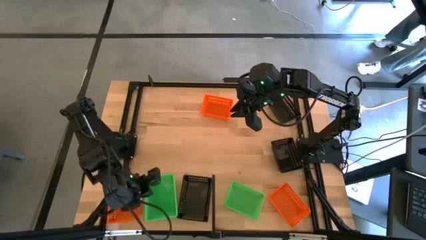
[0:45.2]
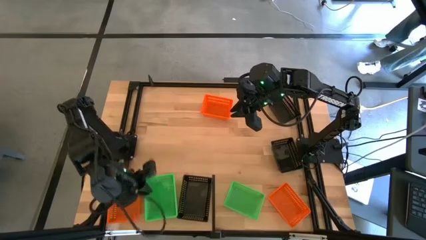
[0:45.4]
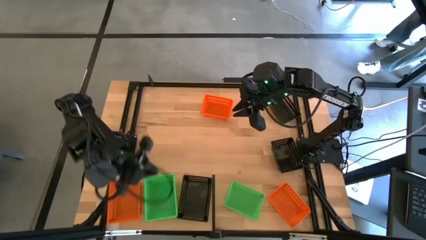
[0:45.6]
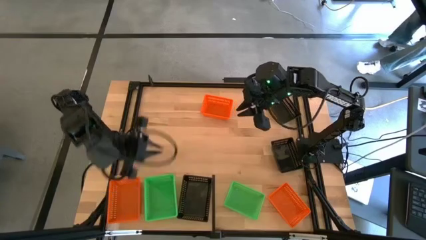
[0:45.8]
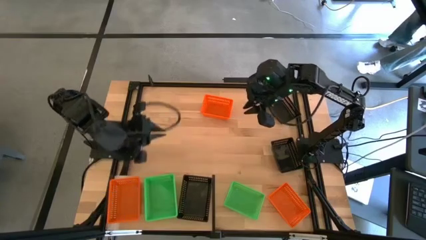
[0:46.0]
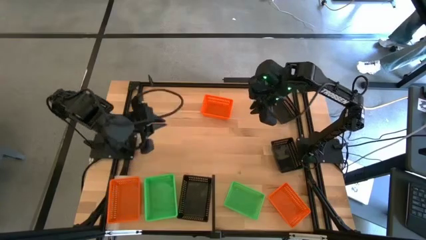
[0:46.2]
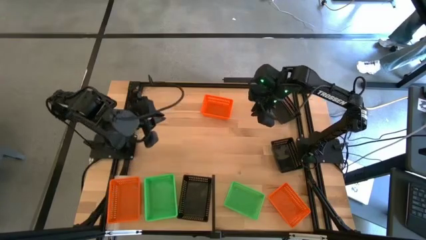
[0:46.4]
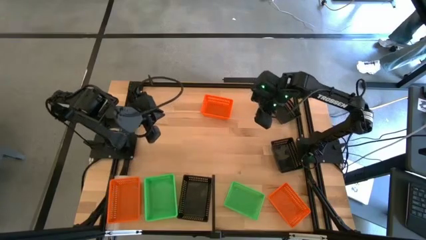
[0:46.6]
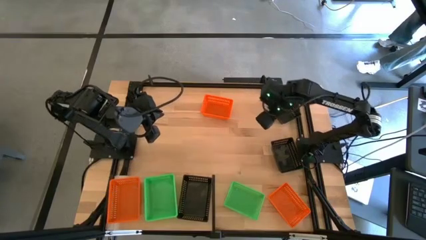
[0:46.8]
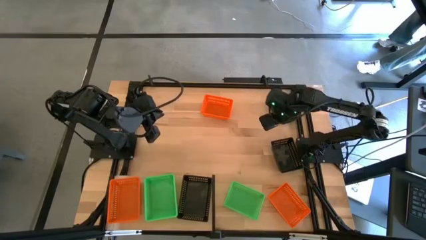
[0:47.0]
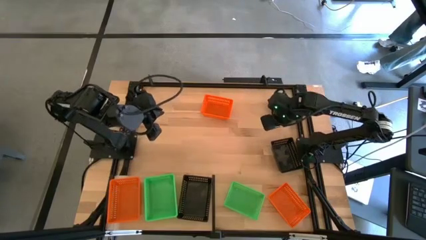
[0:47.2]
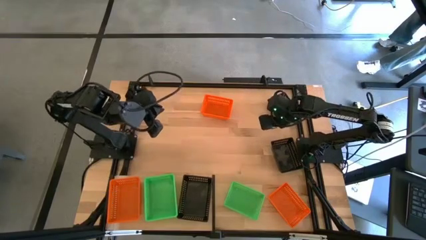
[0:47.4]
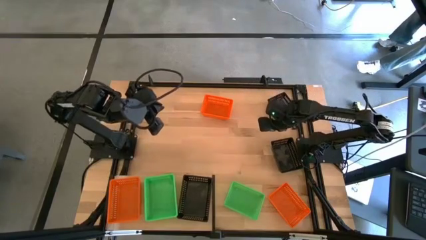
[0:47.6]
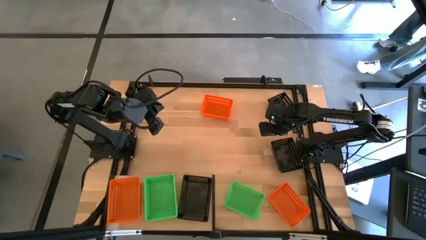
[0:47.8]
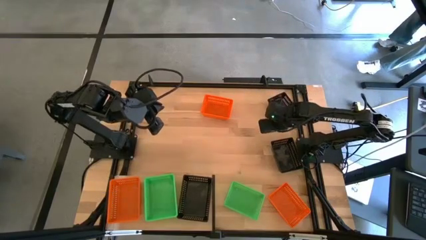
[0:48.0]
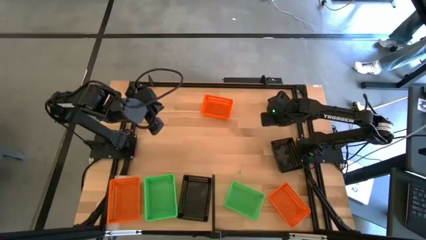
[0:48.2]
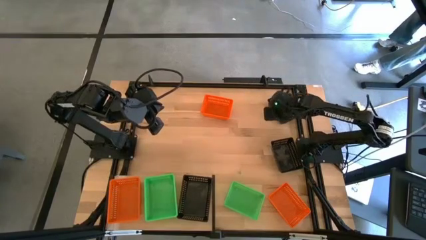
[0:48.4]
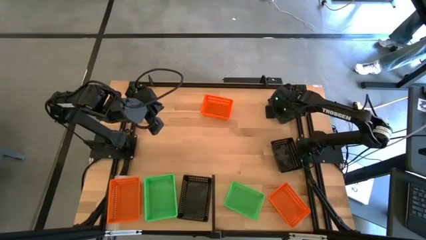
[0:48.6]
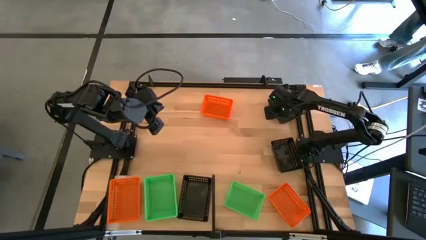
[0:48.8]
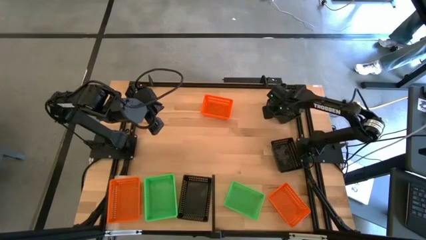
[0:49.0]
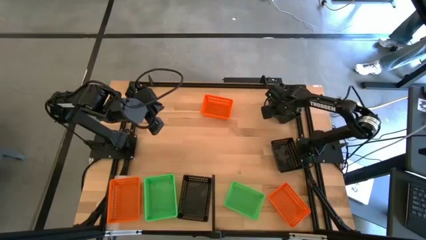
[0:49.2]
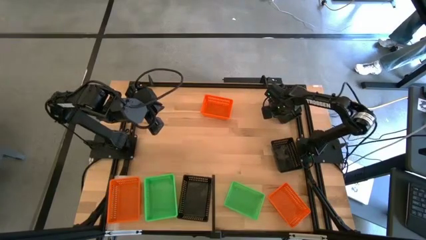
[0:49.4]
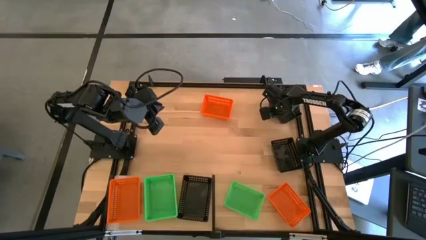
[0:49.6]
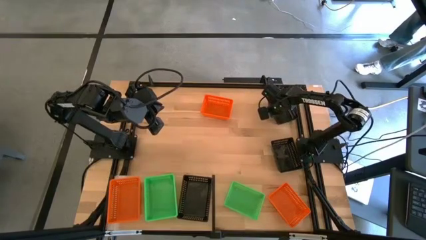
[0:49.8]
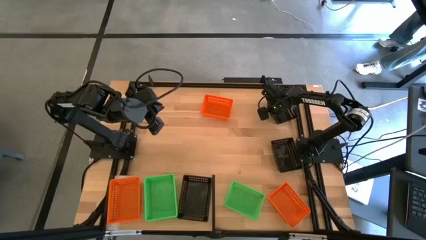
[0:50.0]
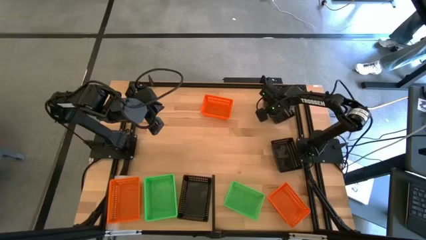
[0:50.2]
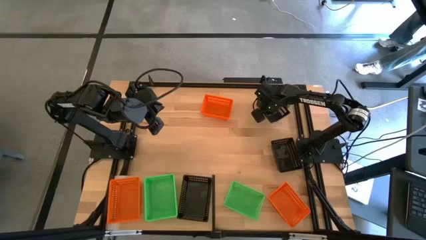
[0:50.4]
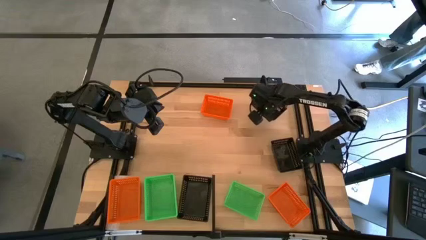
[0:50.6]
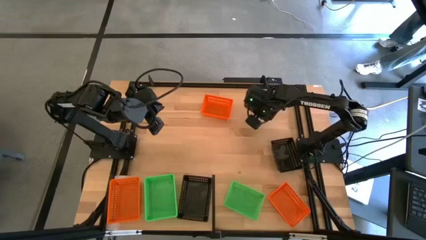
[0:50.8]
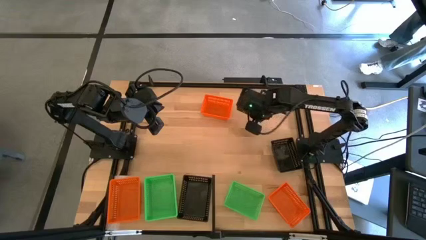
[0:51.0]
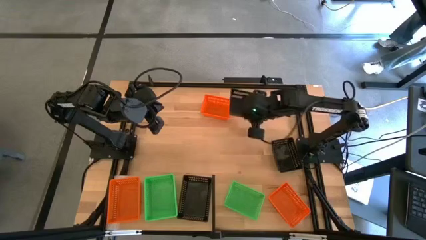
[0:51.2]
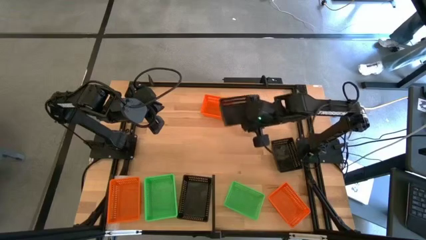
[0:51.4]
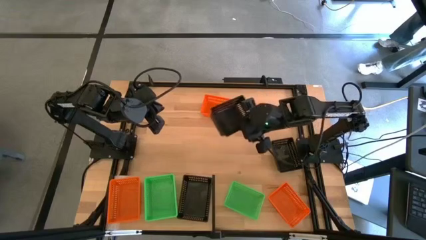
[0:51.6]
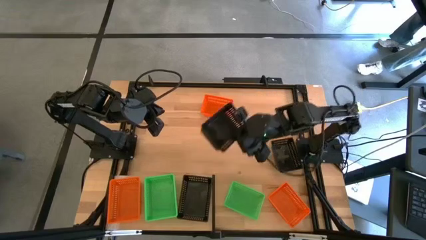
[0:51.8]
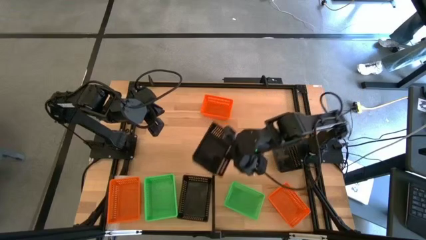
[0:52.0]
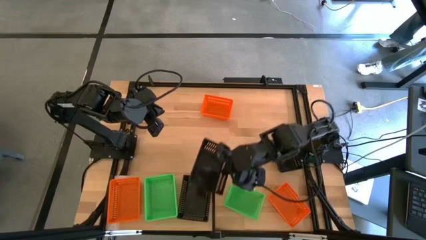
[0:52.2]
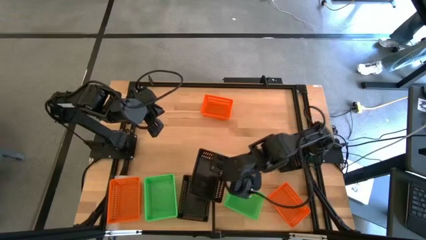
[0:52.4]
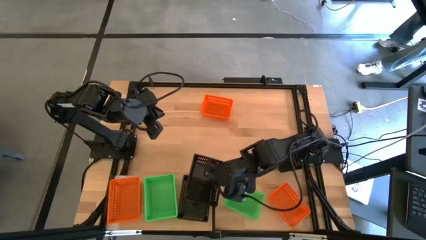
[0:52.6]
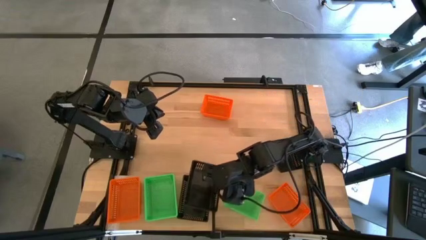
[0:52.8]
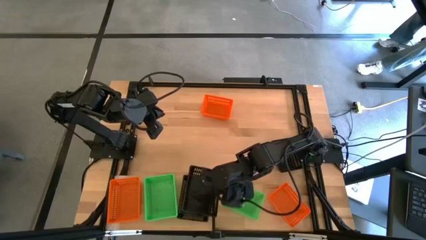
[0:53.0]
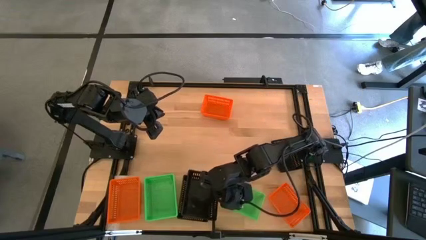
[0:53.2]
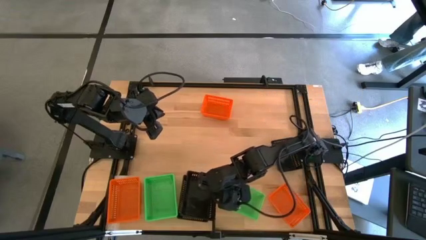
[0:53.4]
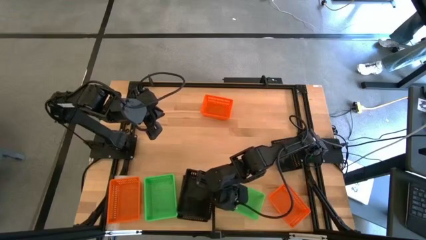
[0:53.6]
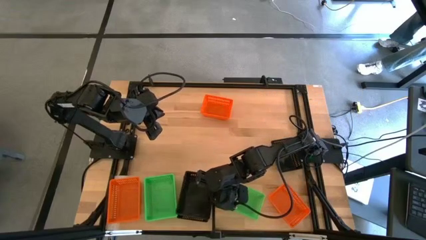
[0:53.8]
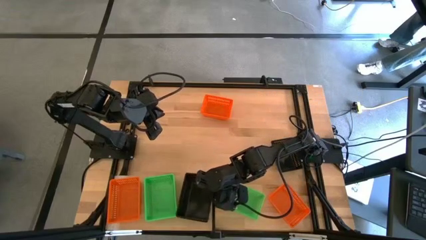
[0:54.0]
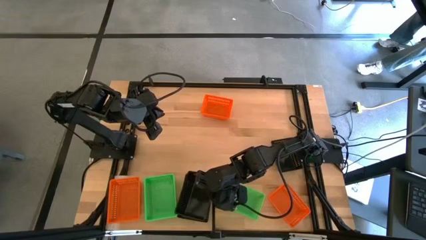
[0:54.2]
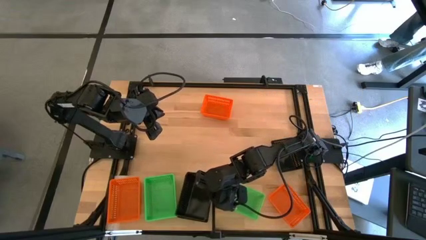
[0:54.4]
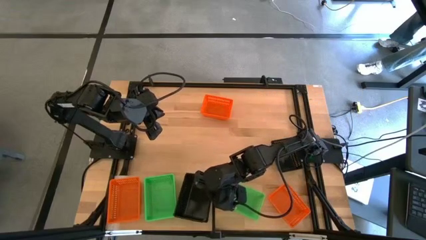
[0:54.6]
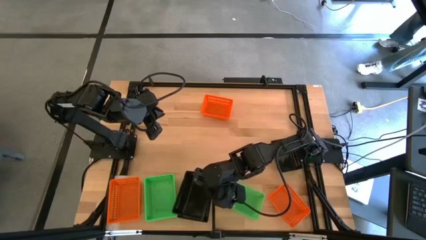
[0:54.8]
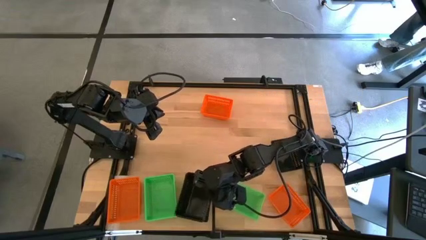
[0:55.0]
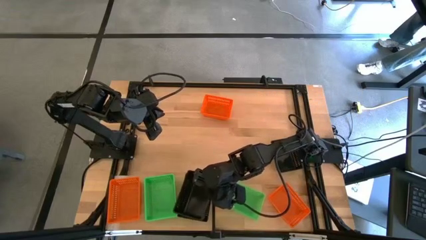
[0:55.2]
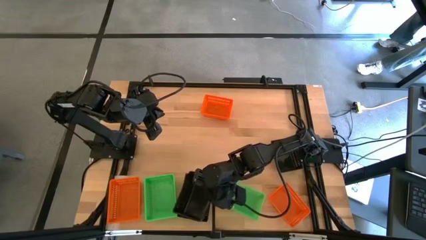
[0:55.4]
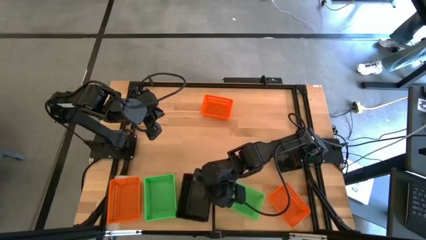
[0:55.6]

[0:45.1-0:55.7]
Task: Stack baskets on shelf by color
Stack the top black basket on top of the other black basket on the shelf

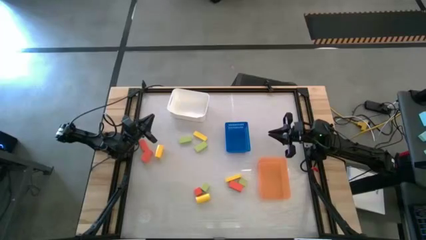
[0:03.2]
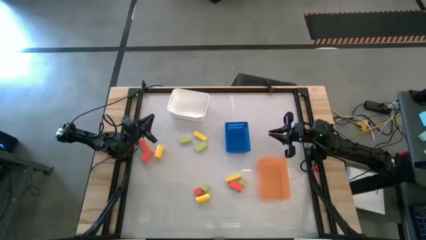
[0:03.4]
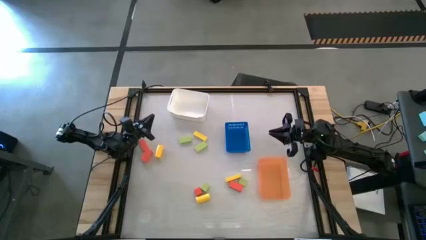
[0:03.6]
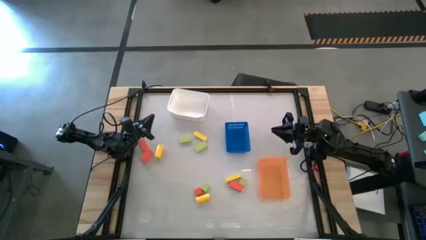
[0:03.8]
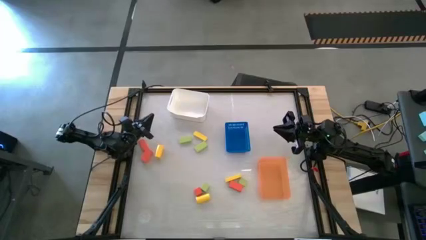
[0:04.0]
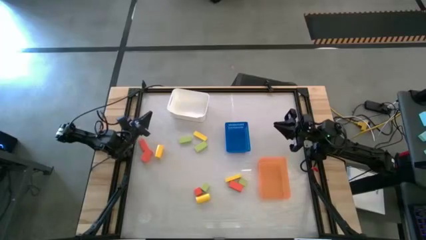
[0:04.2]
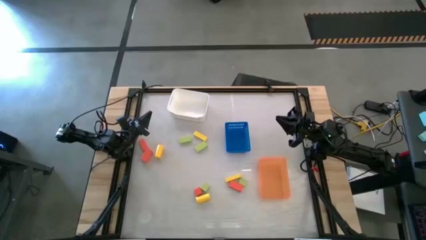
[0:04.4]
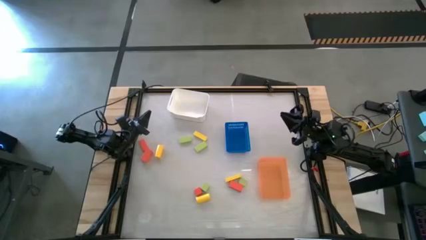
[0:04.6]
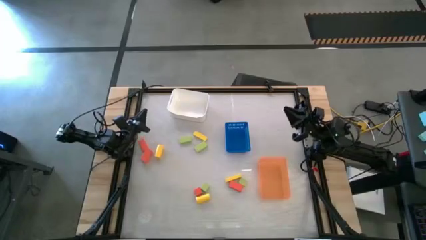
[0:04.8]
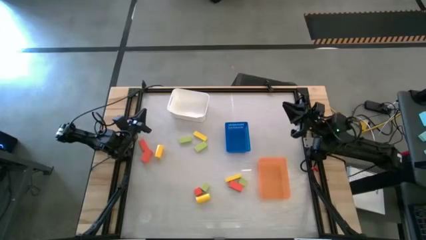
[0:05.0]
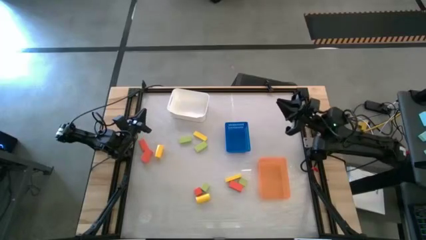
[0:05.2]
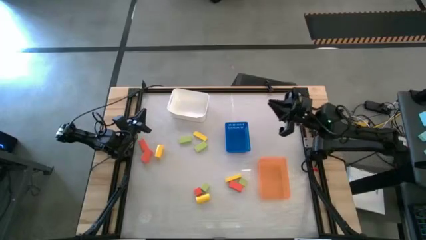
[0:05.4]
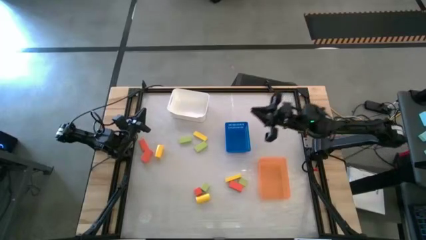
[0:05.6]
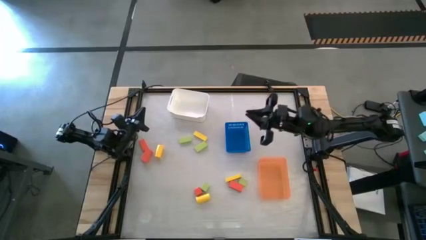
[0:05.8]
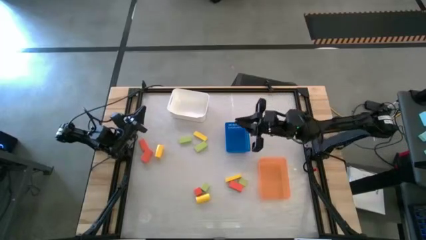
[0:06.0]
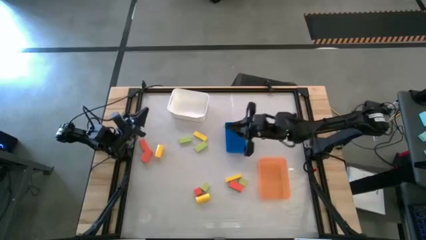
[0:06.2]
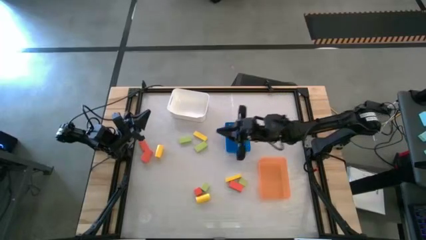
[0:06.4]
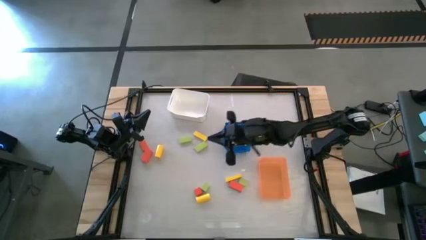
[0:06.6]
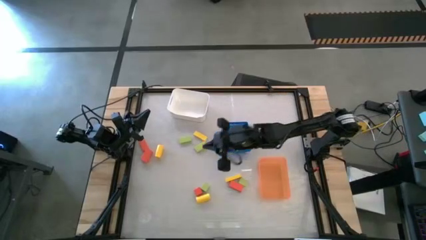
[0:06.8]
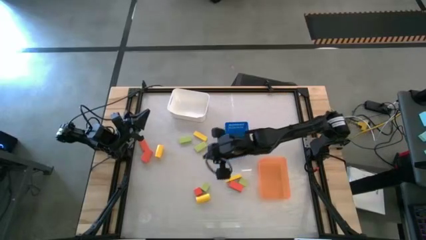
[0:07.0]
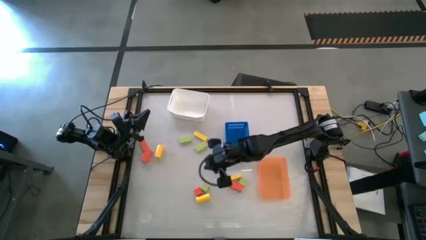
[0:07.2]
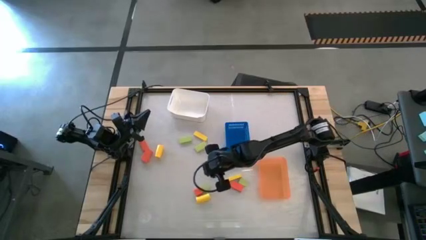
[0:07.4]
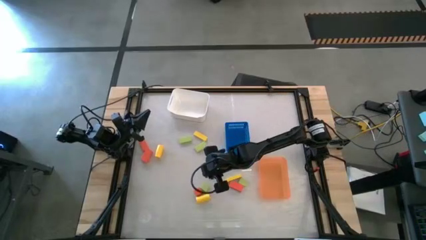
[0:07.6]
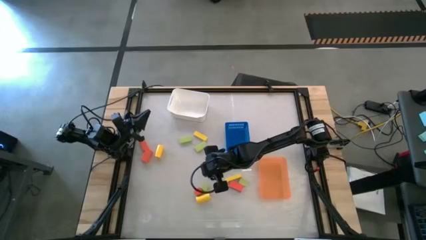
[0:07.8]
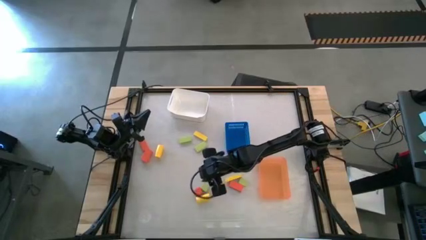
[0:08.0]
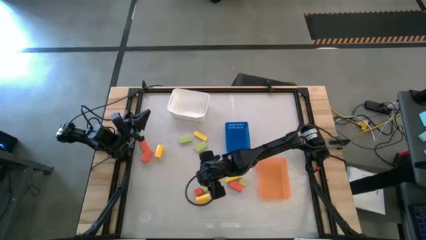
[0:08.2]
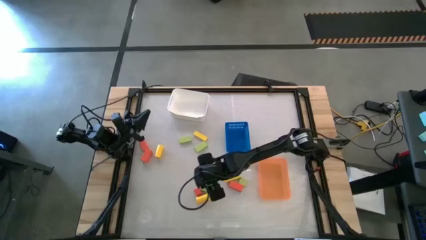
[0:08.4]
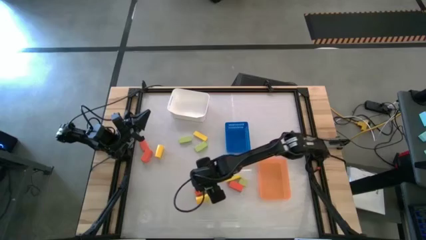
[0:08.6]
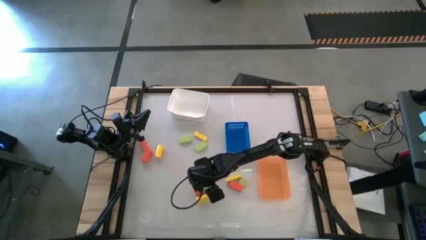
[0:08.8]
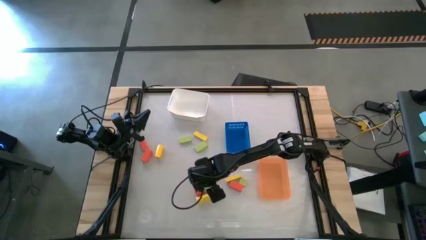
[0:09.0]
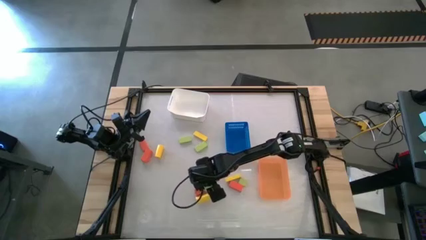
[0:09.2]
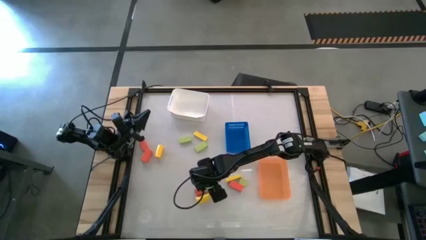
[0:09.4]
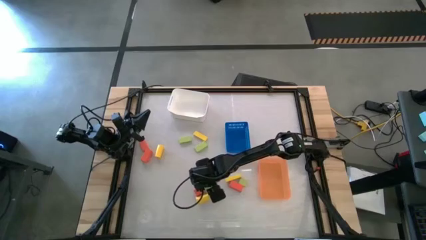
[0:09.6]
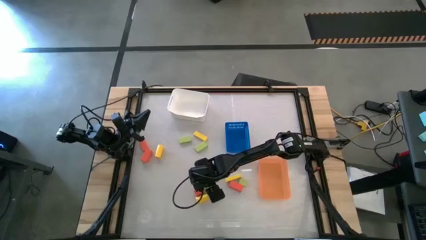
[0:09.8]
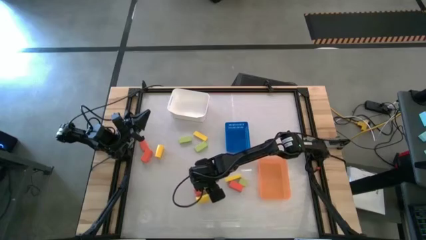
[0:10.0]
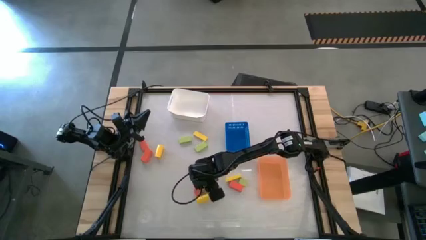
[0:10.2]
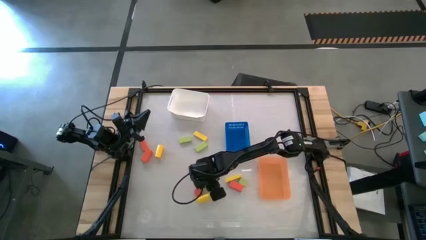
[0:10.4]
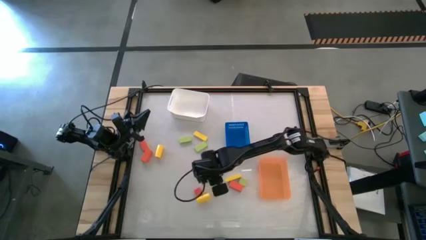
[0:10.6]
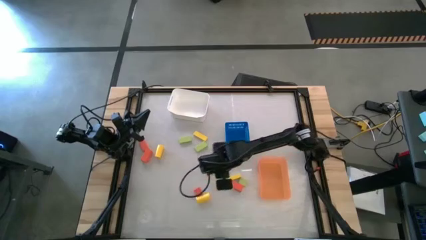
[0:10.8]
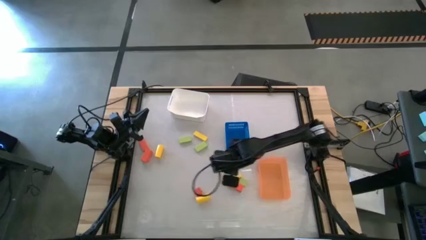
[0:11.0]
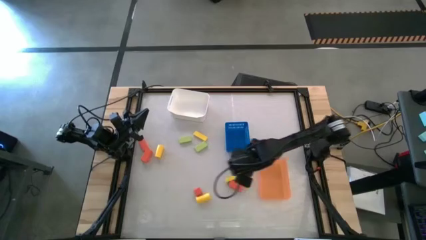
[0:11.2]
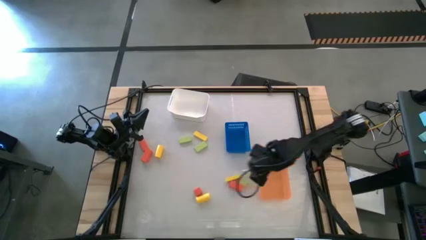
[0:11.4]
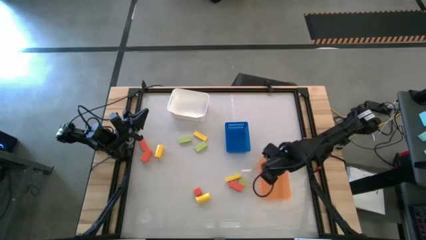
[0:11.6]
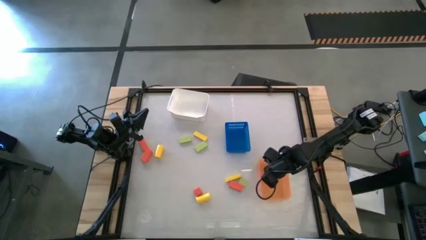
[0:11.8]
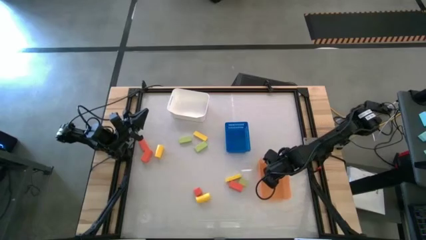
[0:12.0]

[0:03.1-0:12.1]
Task: Sort & place blocks by color
Put the green block into the orange bin
